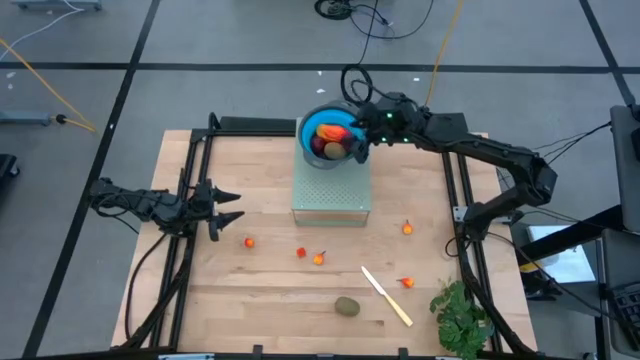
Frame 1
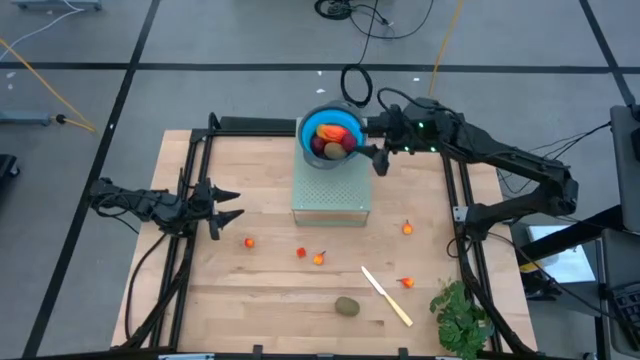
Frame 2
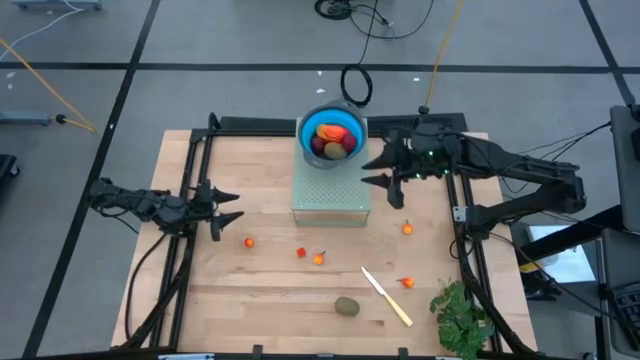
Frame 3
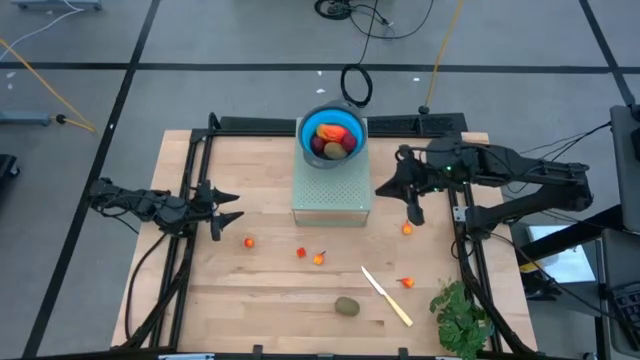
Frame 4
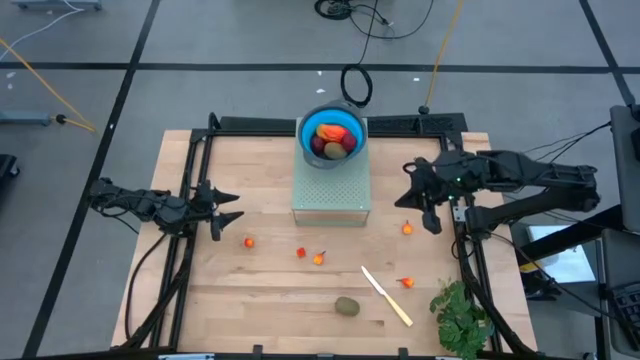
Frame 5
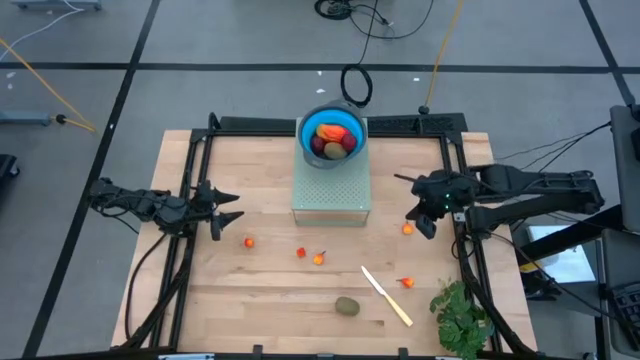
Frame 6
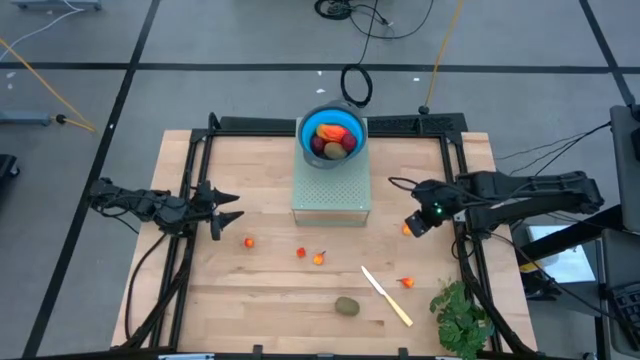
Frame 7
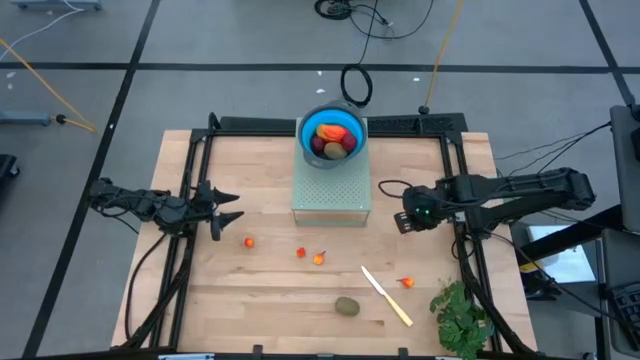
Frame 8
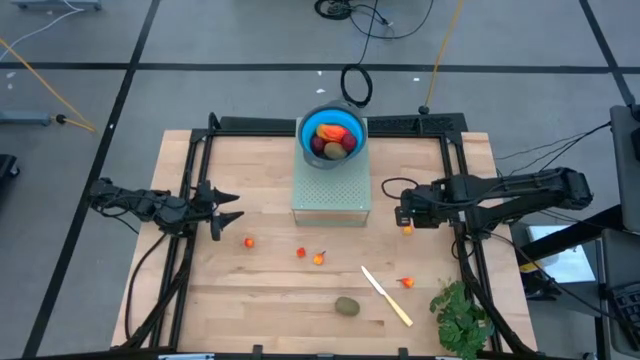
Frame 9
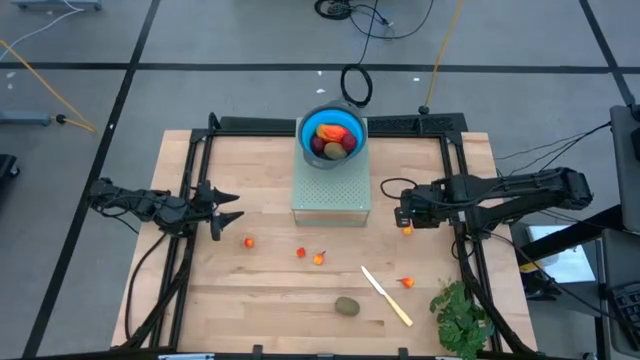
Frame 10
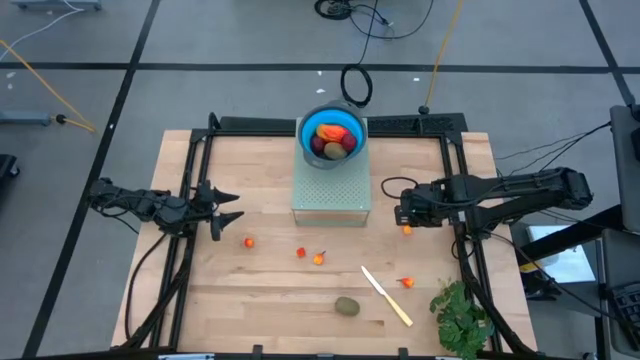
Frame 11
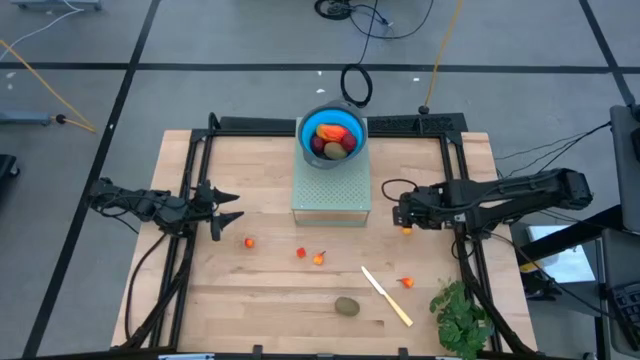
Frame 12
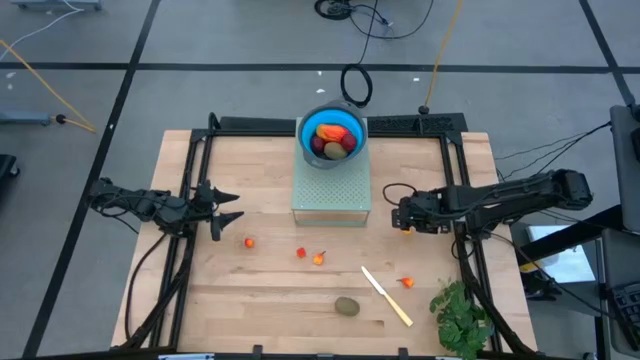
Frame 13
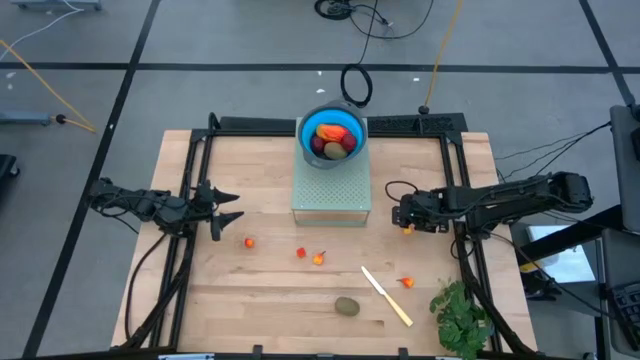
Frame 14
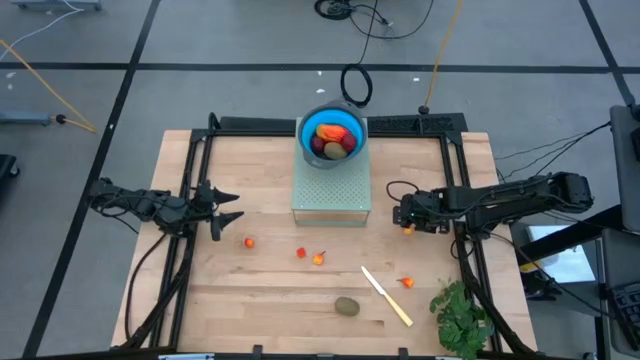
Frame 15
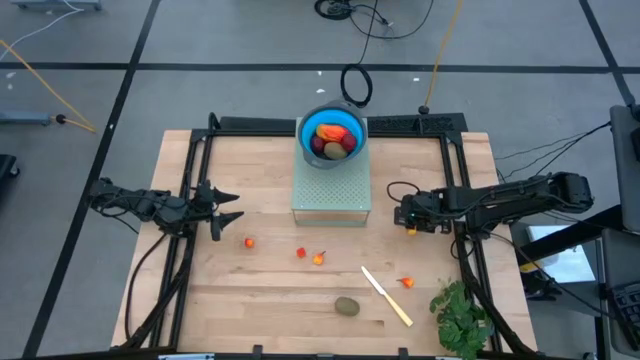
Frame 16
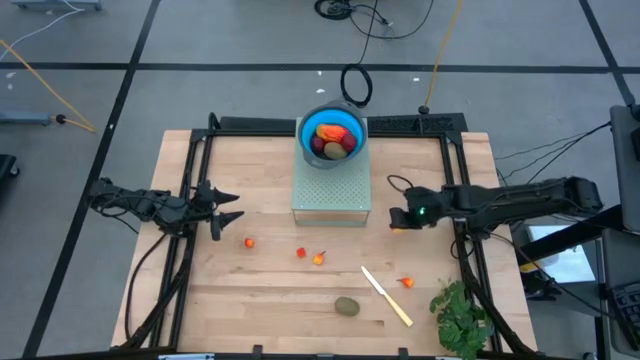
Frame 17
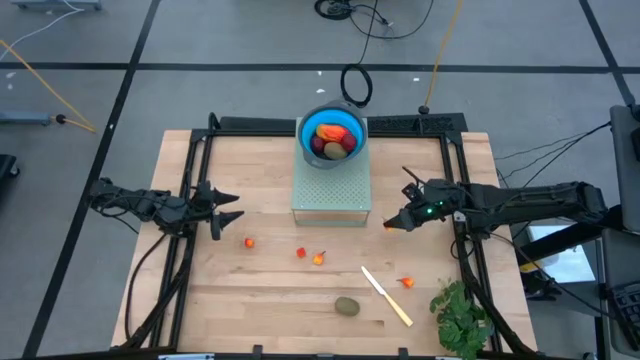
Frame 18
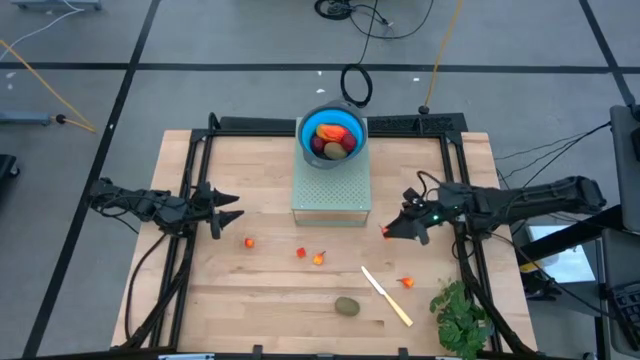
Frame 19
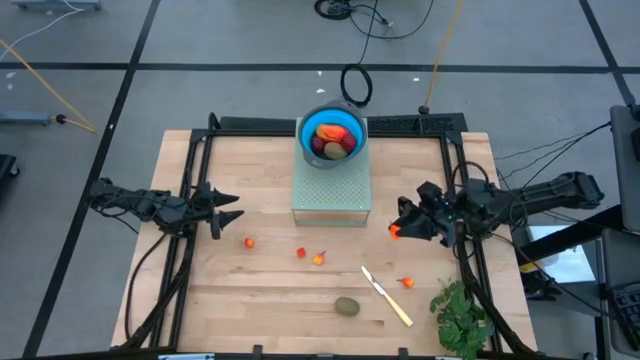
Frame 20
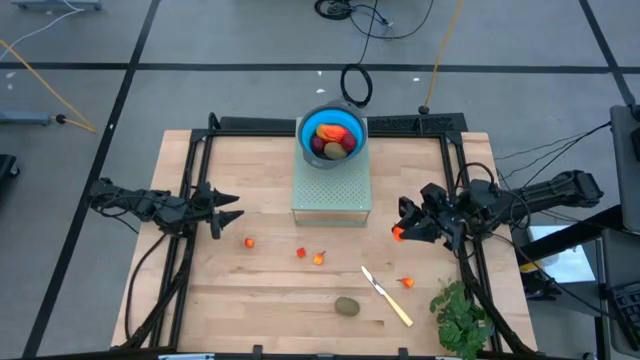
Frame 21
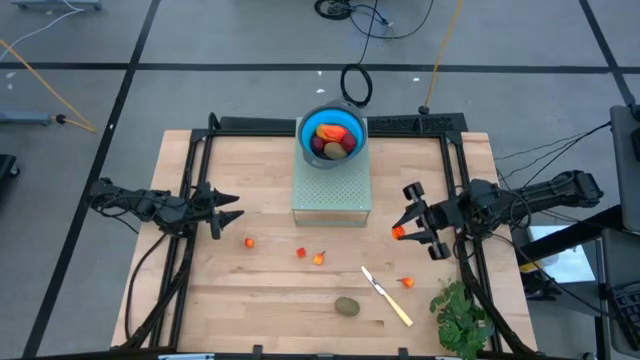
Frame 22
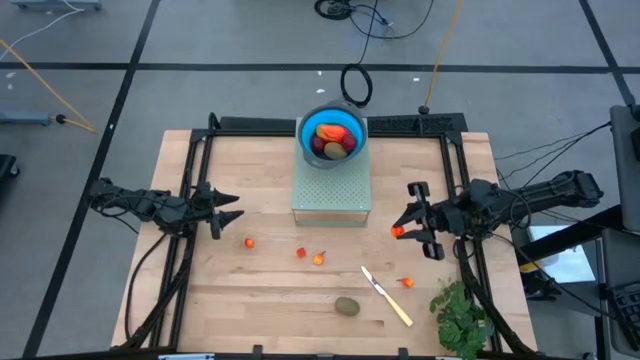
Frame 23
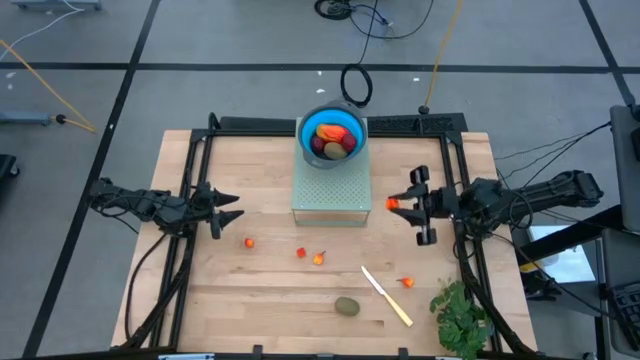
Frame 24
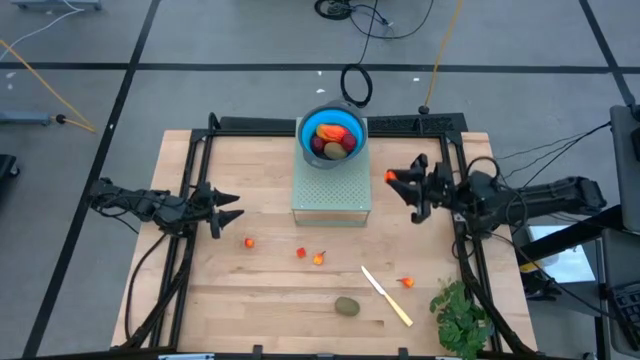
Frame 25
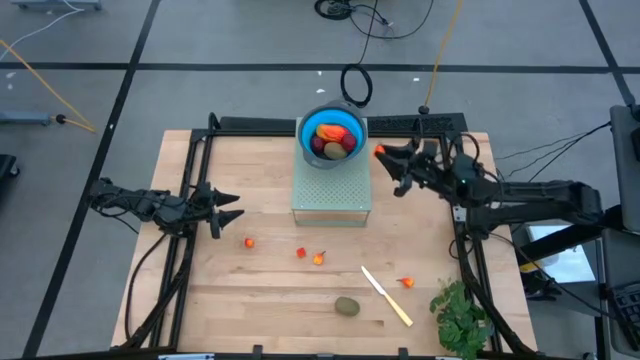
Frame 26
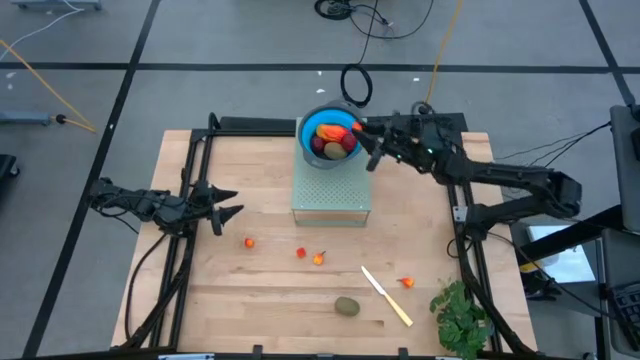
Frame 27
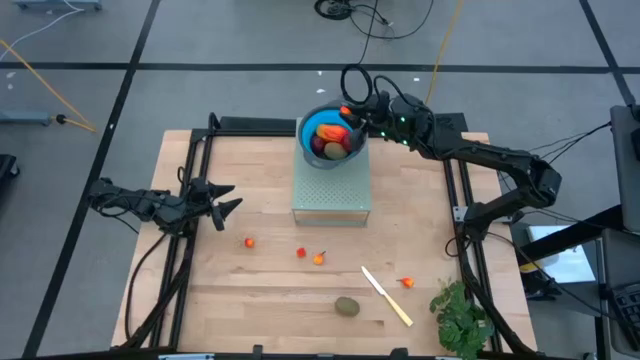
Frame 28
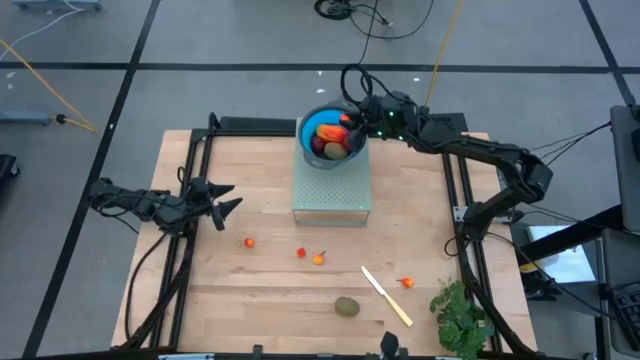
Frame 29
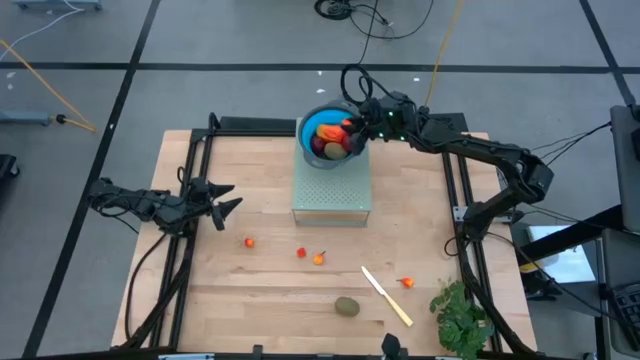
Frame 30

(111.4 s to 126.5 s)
Task: Pick & Place Fruit
Put the peach into the blue strainer bowl on the shelf

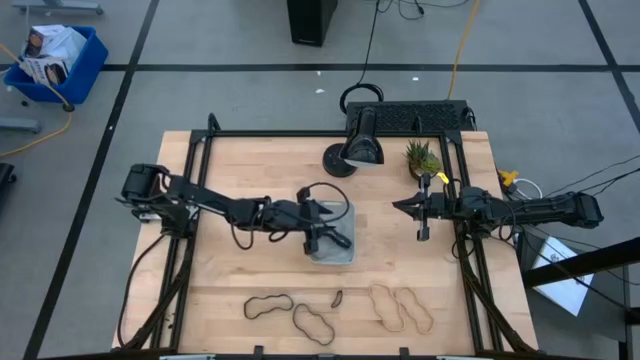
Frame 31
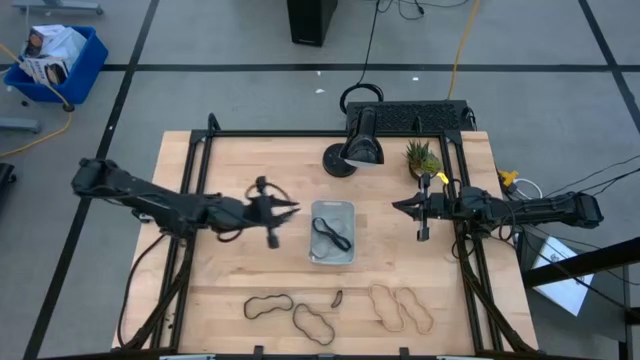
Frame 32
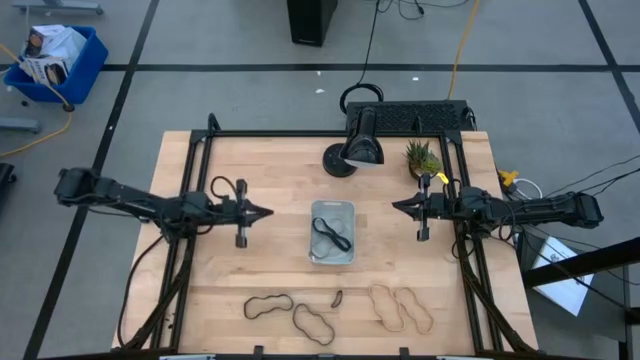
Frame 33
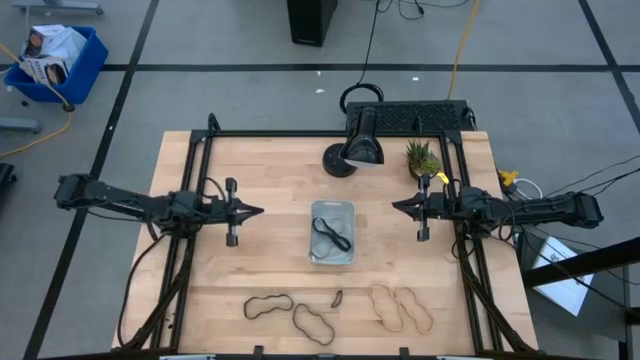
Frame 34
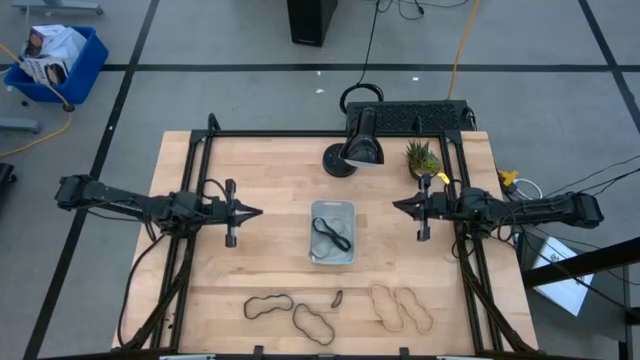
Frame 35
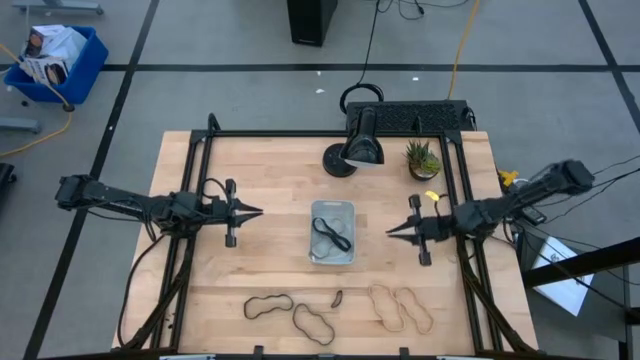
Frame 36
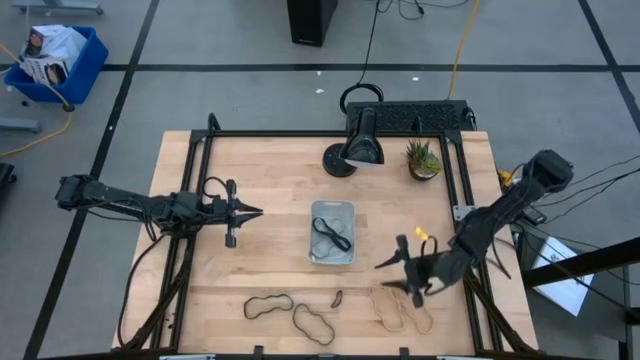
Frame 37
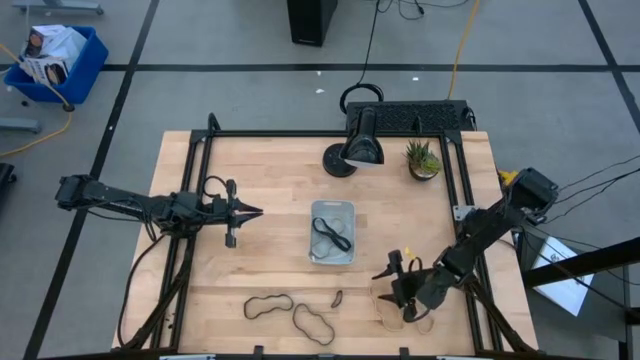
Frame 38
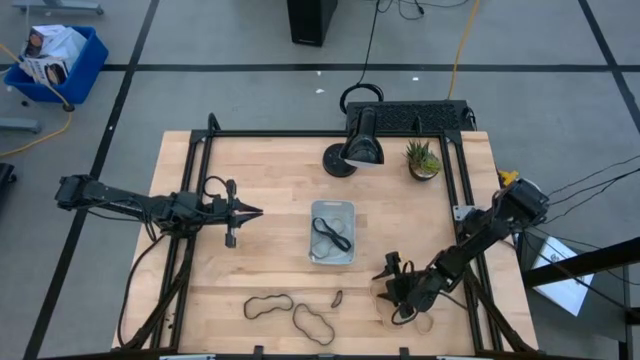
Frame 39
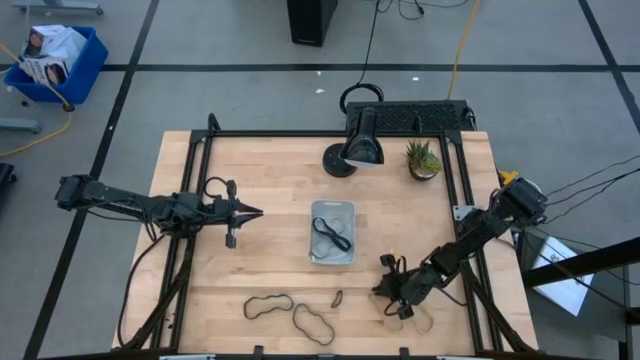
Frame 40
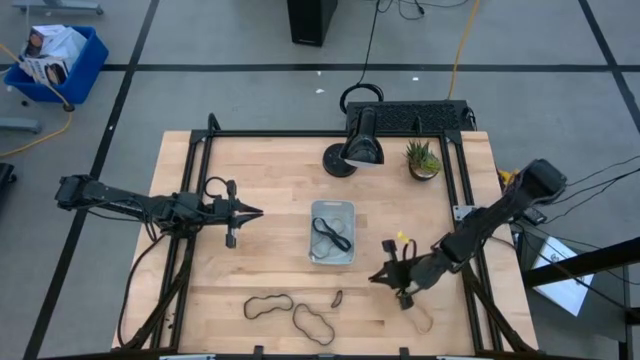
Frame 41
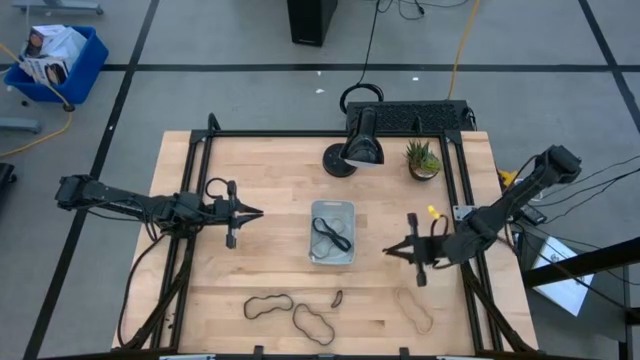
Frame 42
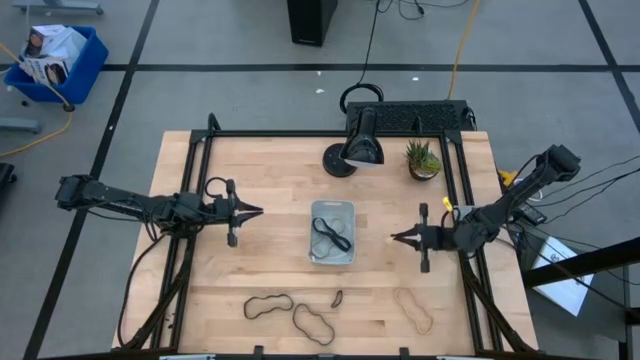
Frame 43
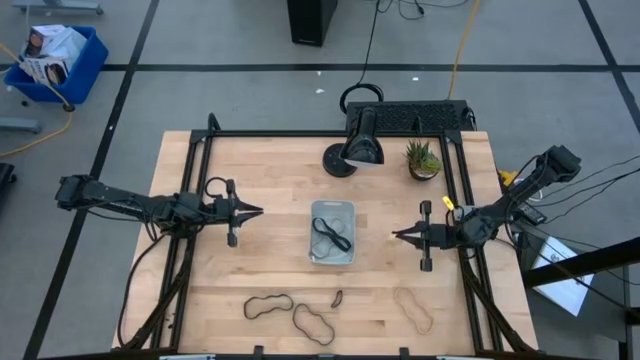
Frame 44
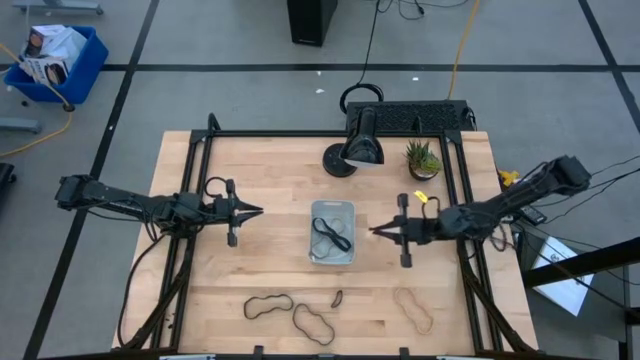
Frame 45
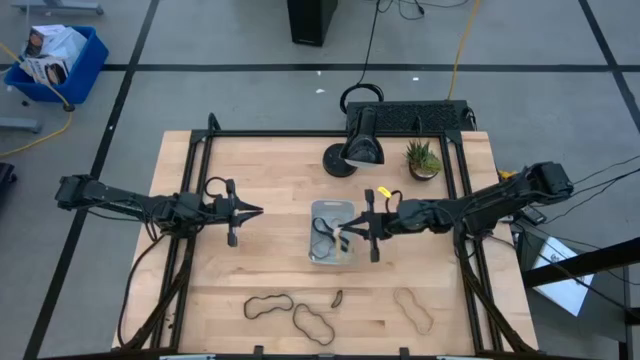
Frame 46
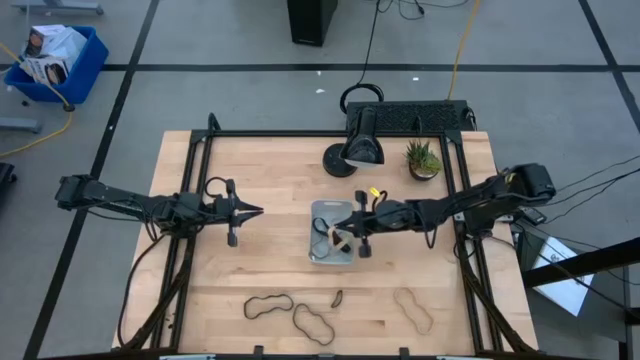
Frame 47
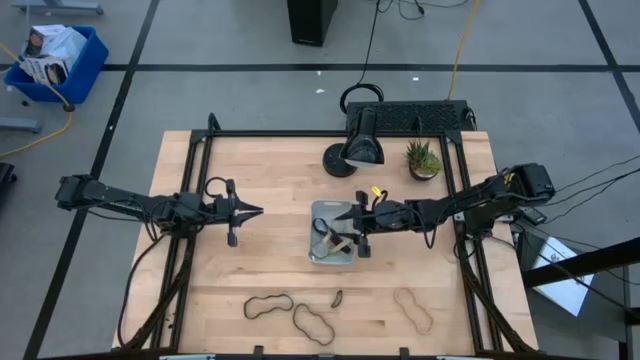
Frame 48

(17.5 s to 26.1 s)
Task: Pick and place rubber bands into bin
Put the left brown rubber band into the gray bin
